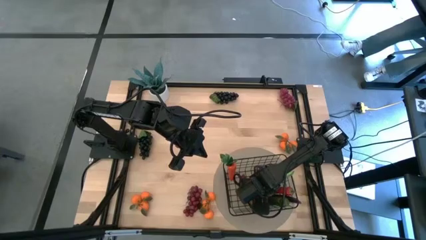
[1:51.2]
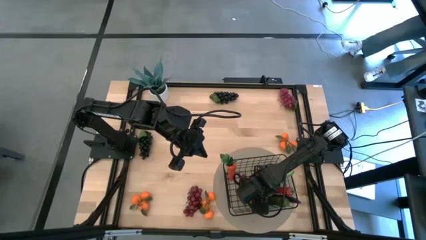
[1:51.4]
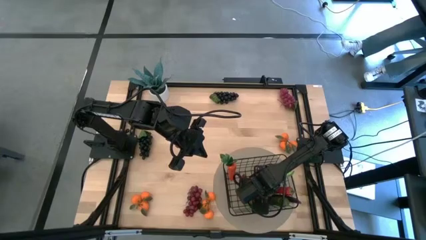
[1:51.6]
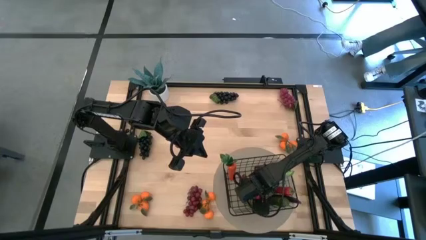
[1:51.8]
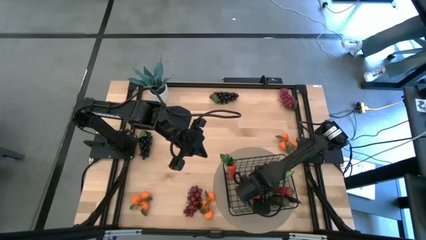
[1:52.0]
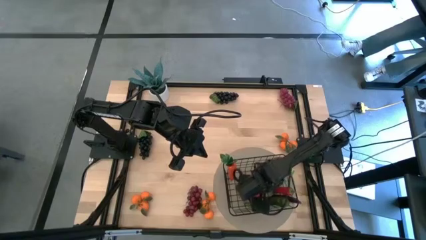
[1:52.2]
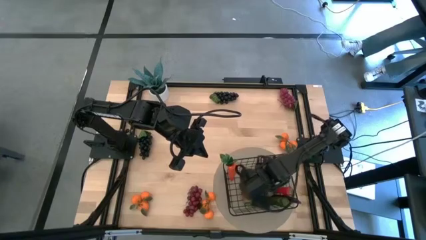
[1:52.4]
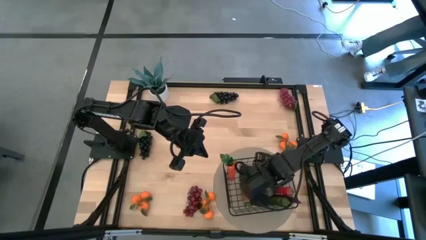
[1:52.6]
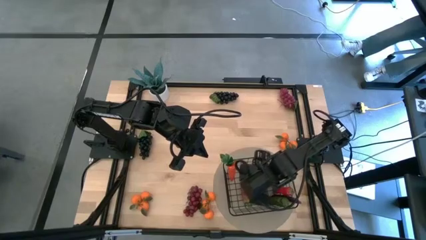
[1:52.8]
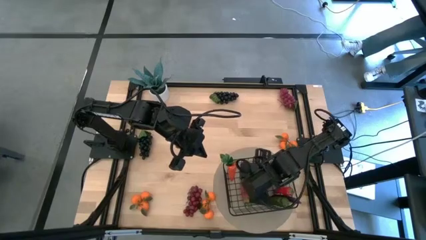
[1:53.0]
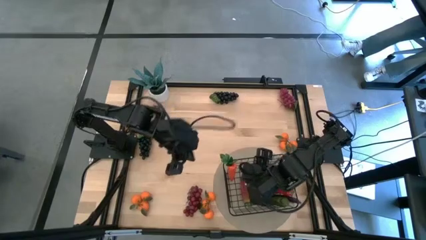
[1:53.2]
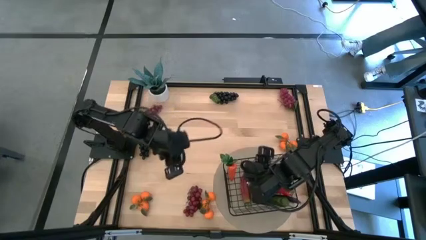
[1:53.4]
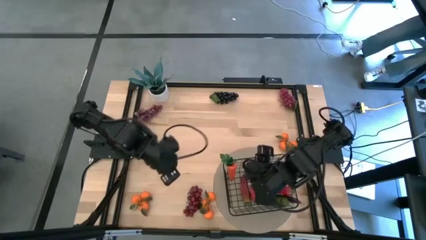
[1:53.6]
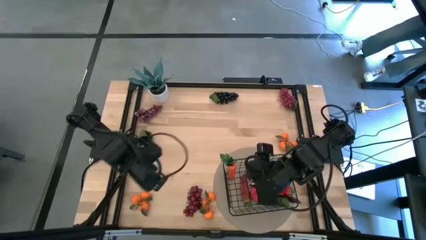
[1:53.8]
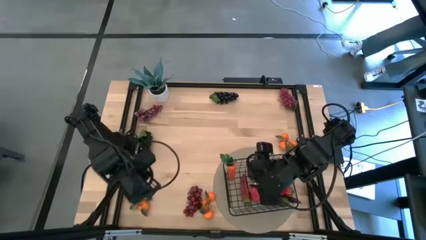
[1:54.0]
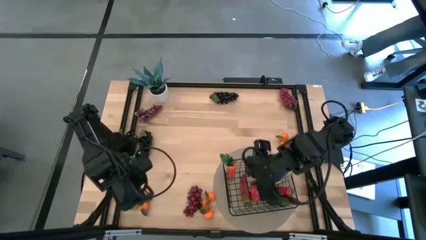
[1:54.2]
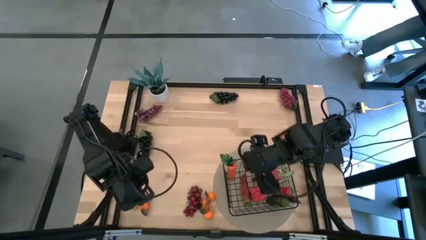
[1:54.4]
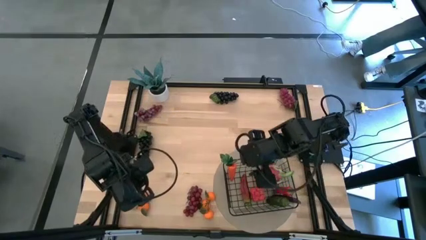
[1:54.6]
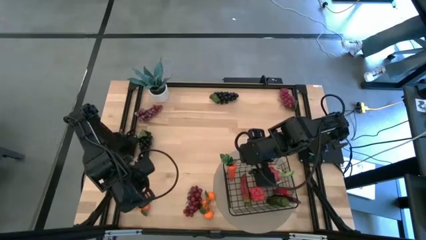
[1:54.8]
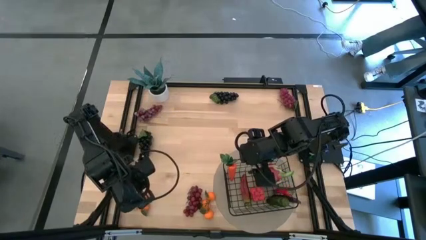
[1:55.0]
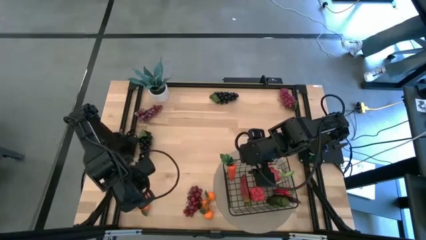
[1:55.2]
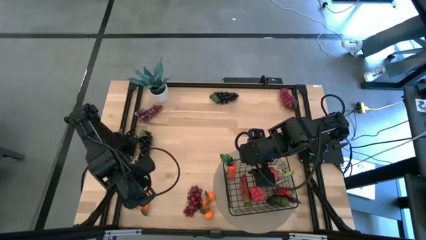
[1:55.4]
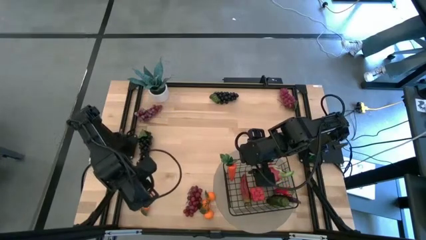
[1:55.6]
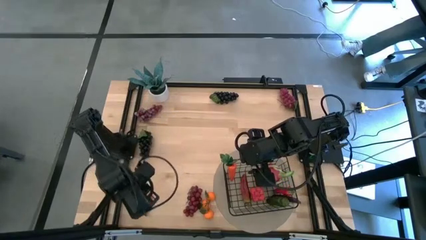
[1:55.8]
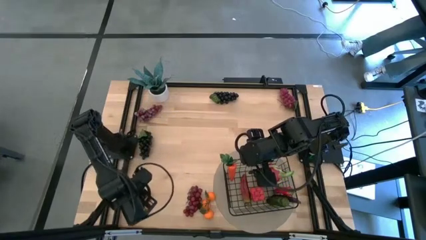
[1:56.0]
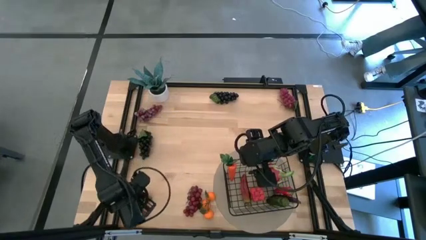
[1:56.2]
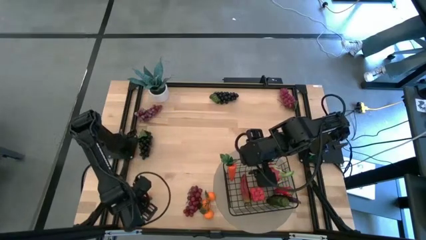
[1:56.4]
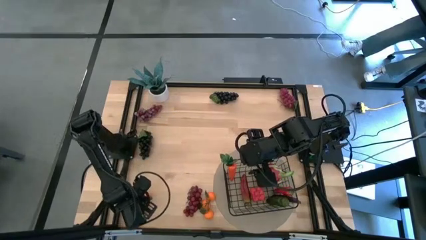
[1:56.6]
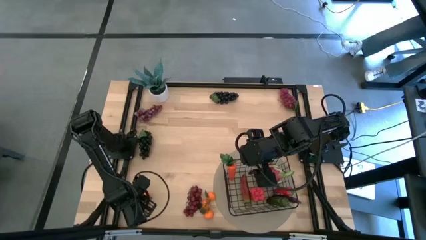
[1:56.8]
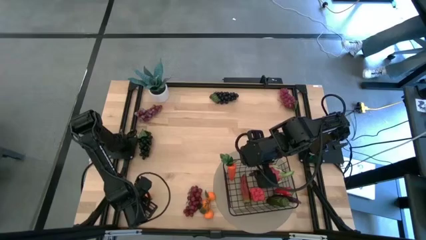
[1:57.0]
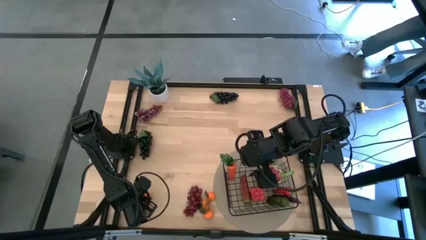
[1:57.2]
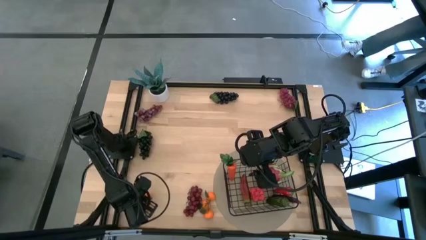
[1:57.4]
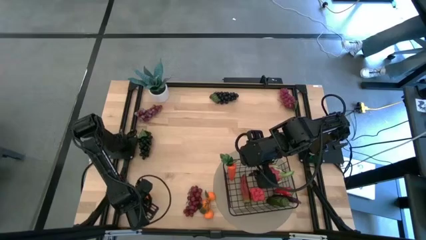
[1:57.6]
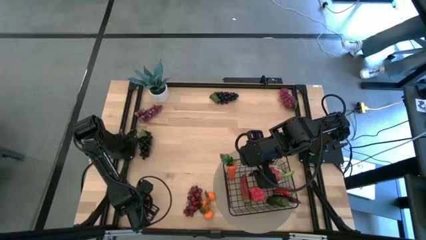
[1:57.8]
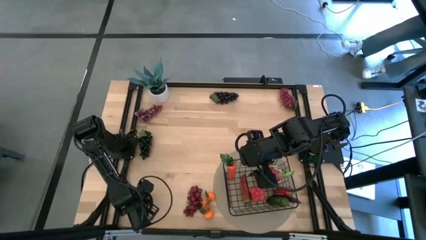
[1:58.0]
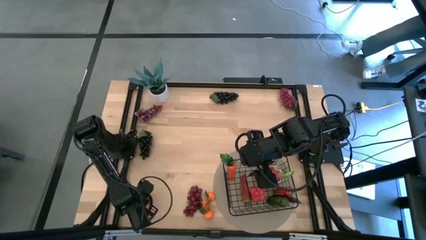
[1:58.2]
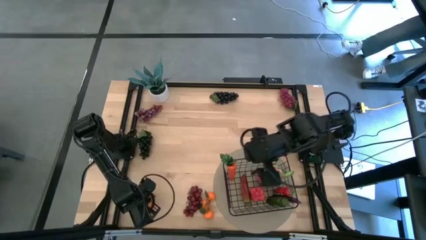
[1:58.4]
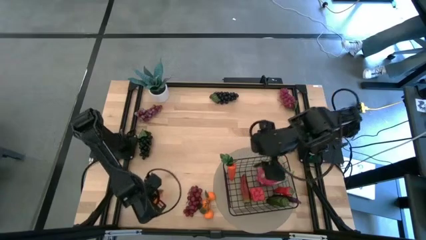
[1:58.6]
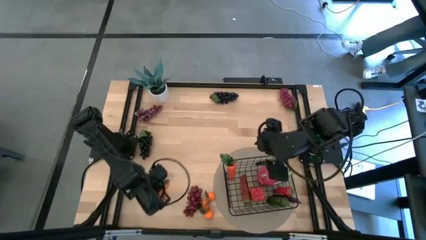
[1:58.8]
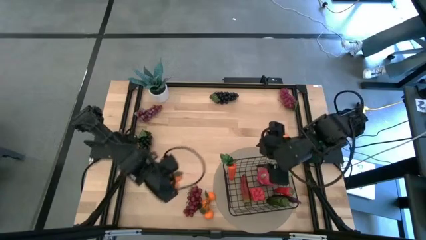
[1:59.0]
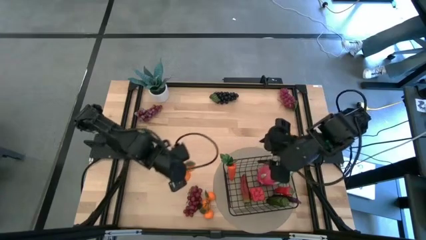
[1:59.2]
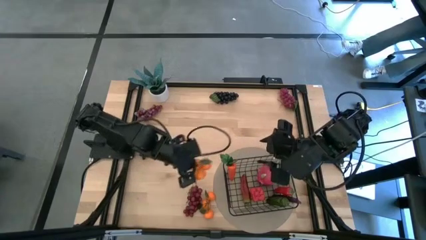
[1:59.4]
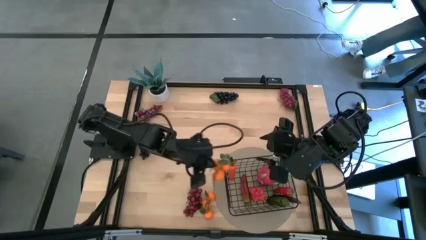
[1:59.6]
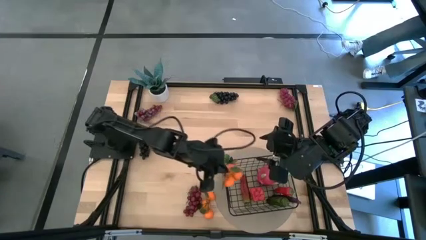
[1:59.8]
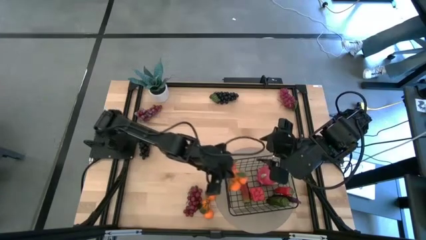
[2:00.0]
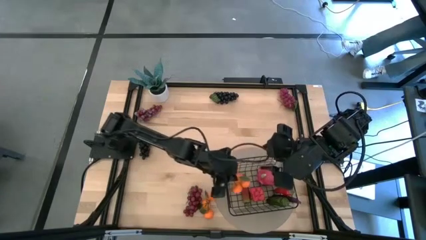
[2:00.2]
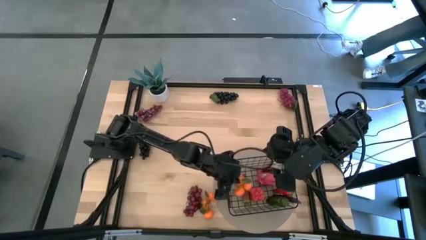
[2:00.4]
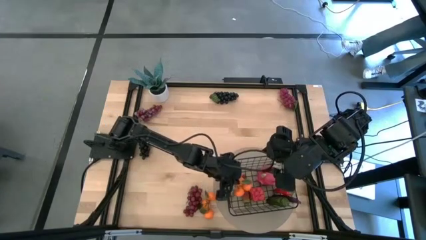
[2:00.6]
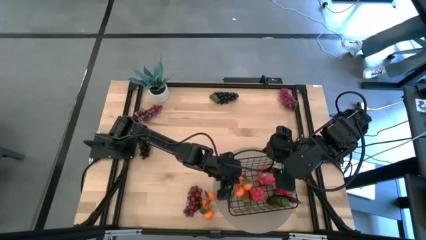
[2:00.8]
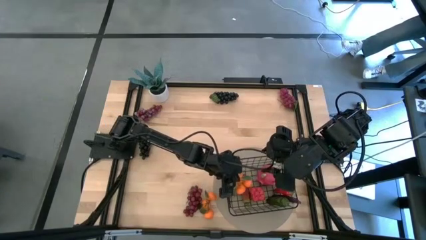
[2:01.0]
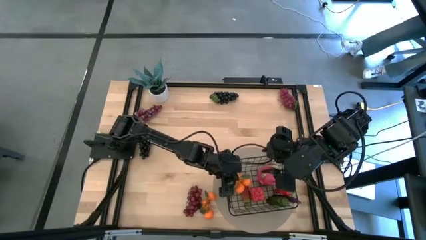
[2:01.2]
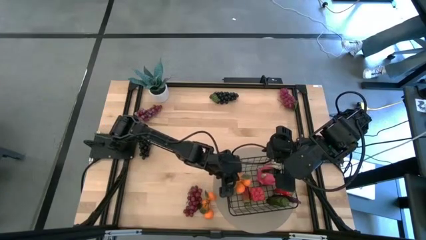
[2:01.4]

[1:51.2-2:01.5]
Task: Build produce basket
Put the bottom left orange into the wire basket

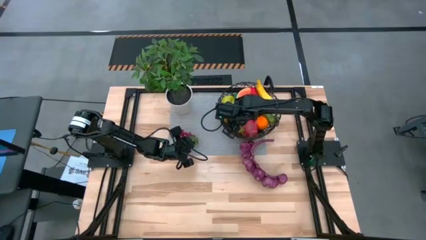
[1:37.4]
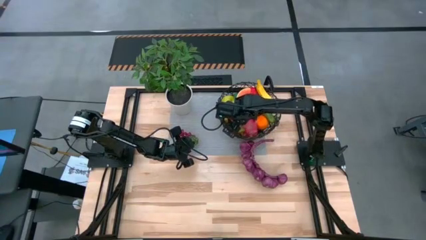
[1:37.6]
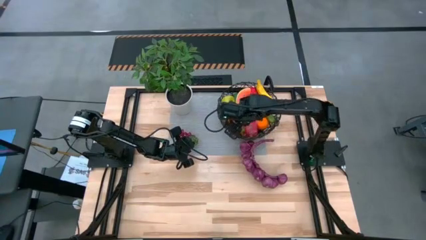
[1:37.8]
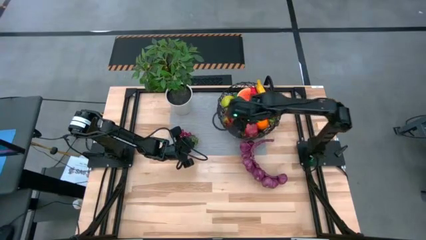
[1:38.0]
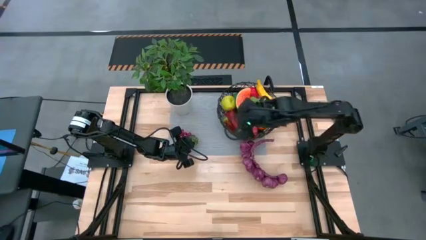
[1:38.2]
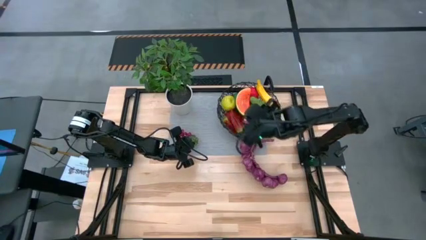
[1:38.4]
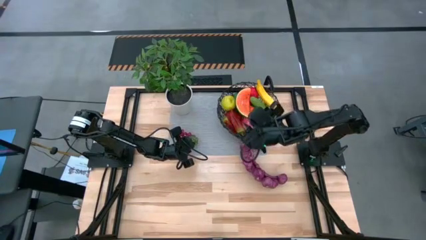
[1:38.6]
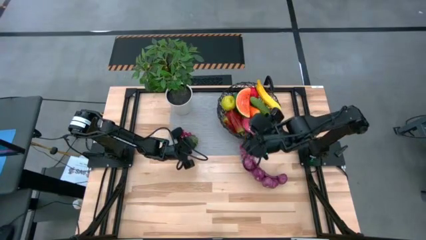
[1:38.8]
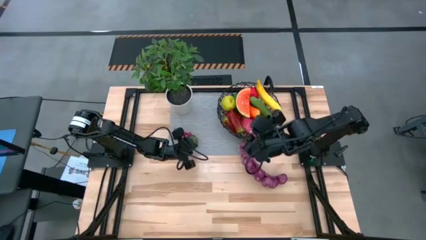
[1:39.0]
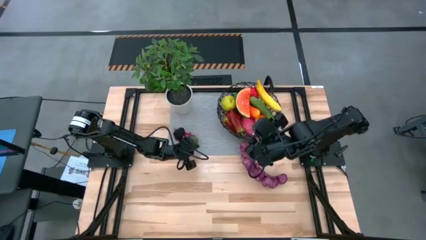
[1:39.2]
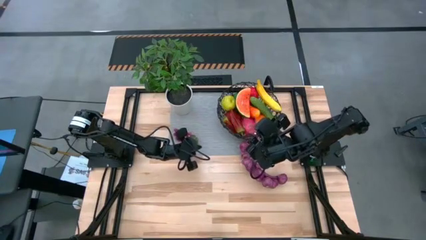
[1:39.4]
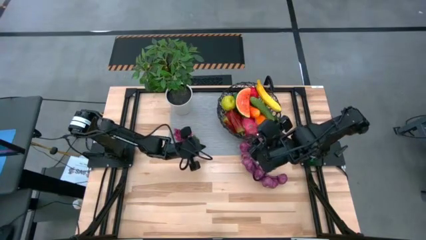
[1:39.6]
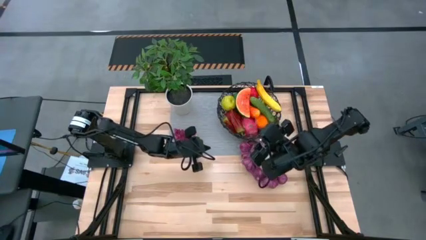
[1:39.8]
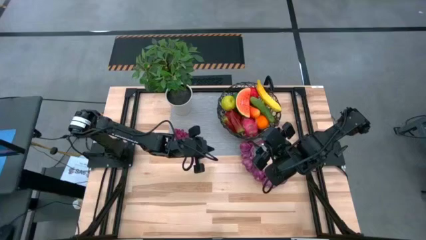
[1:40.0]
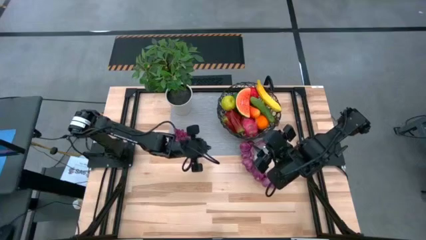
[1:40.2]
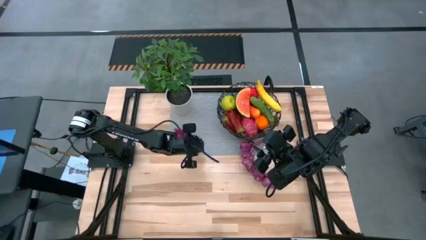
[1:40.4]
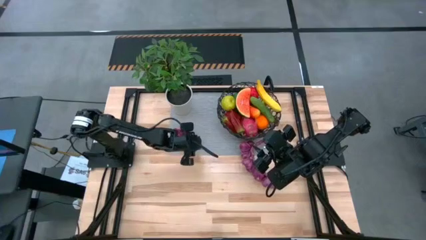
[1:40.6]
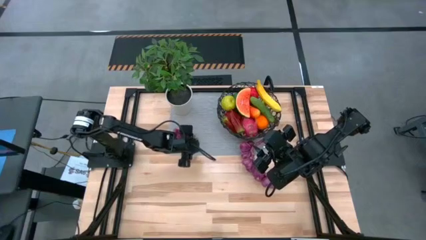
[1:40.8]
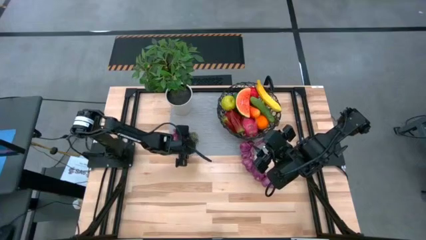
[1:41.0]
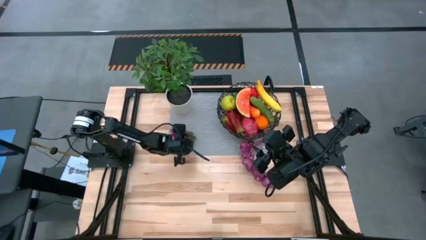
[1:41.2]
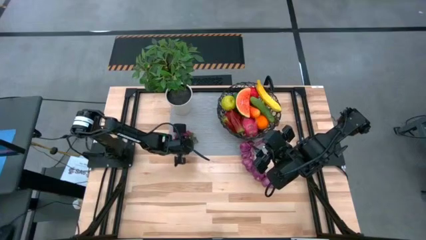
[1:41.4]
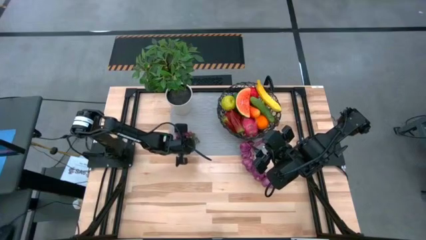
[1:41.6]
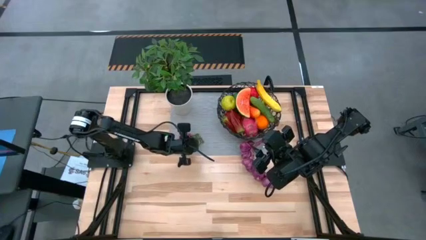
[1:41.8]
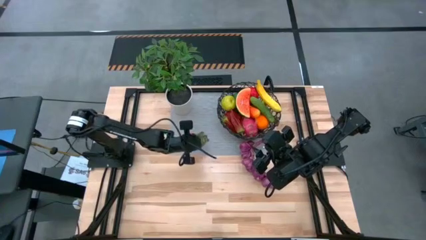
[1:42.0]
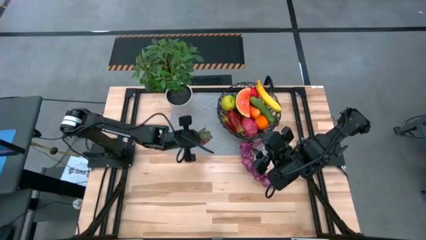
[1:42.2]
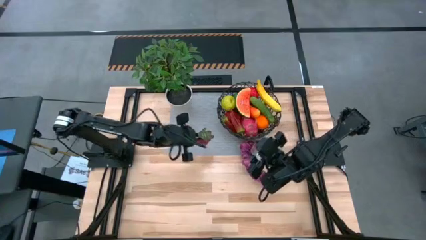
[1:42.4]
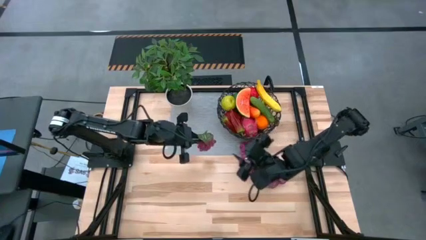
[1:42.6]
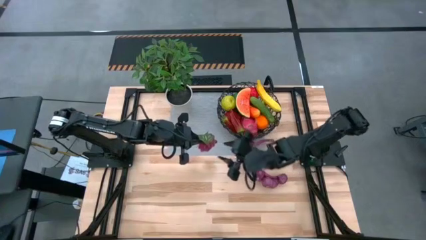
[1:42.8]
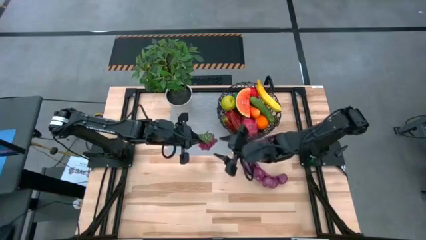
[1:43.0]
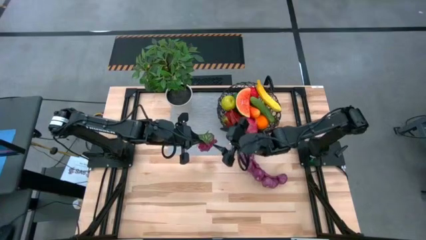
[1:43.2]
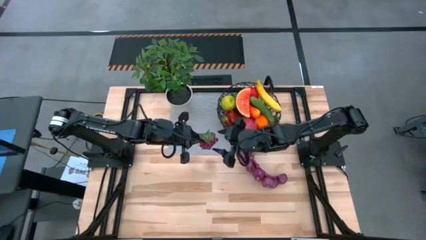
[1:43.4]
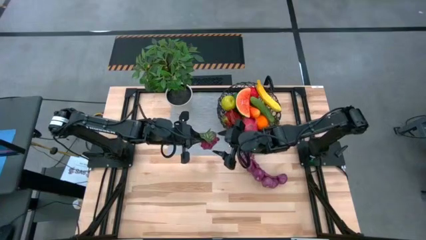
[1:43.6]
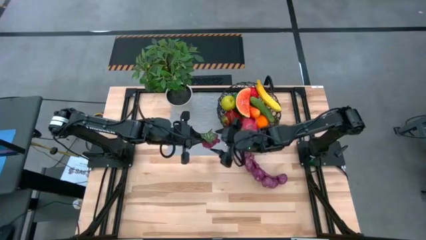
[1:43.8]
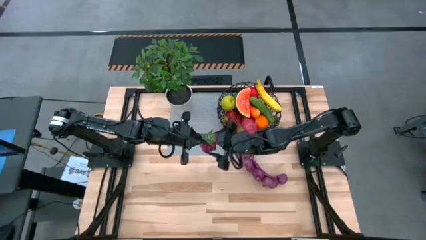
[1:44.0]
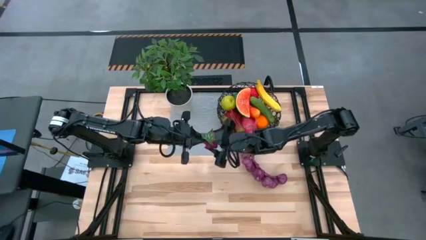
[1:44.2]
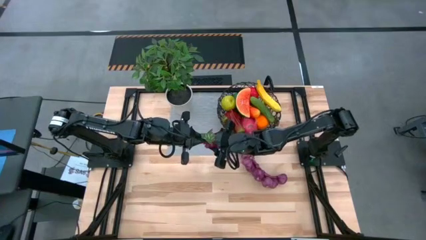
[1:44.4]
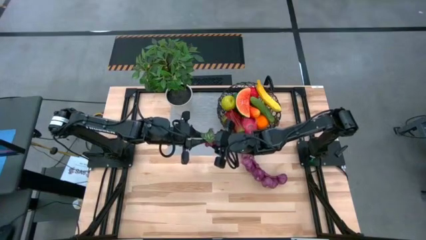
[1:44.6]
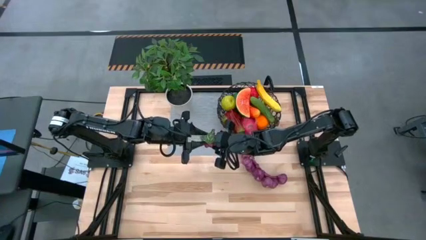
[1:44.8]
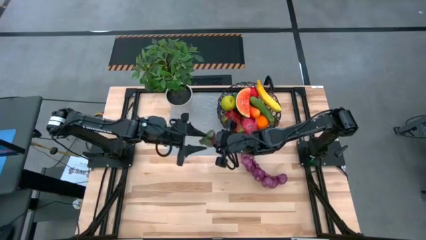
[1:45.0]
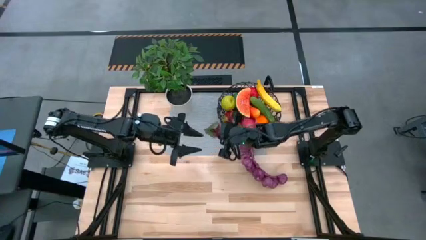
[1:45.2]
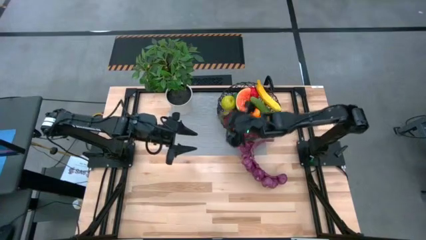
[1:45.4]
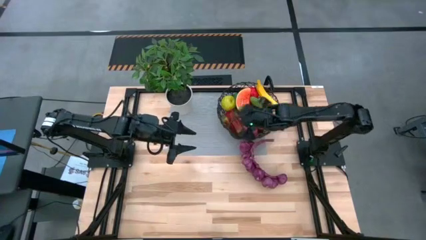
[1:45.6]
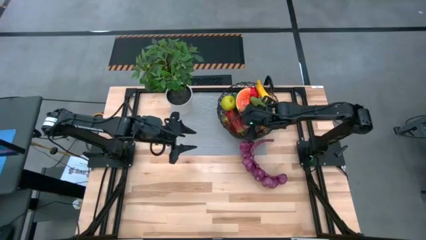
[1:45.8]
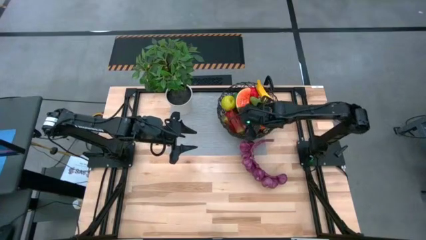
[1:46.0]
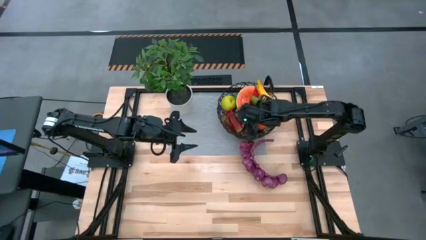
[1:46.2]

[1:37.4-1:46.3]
Task: Build produce basket
Put the grapes into the wire basket
